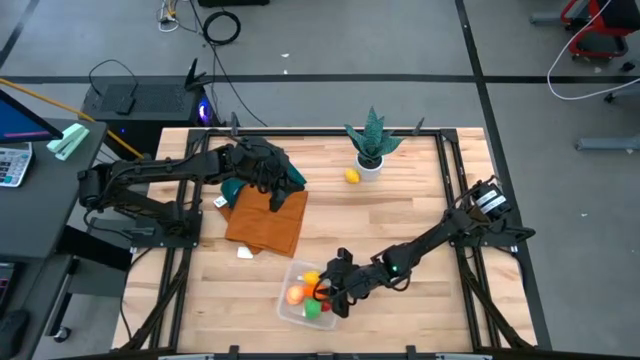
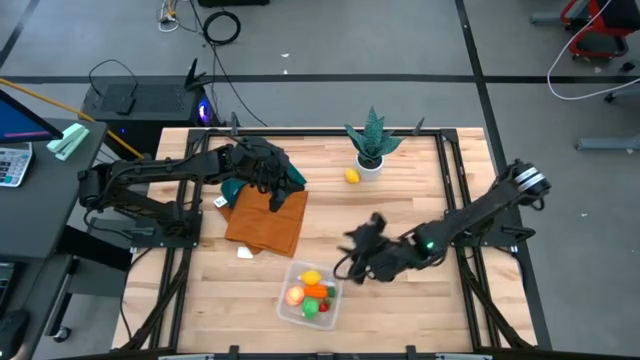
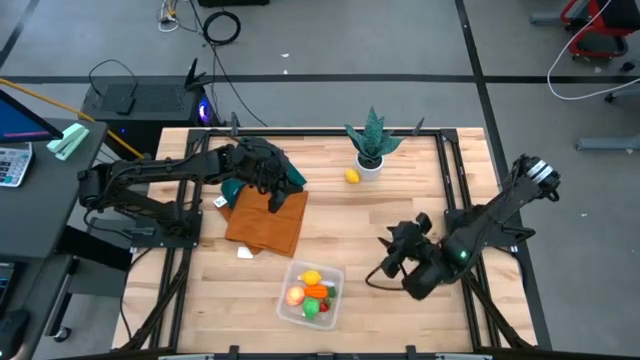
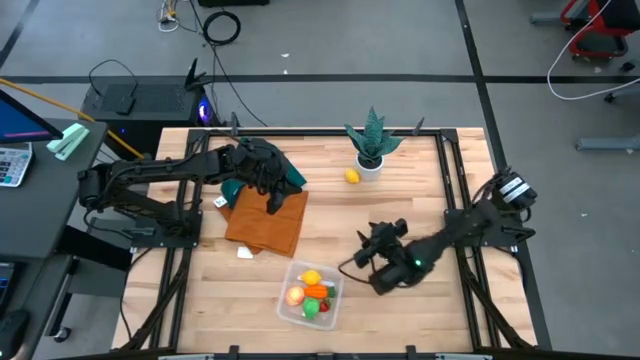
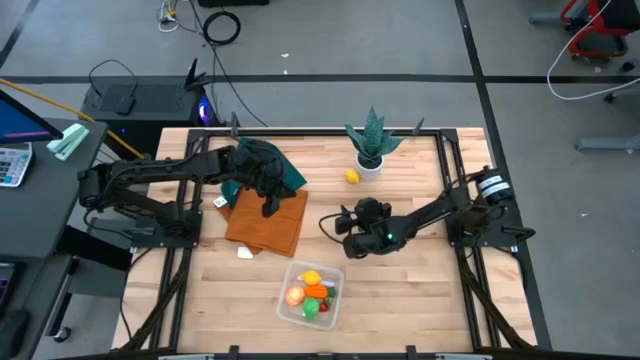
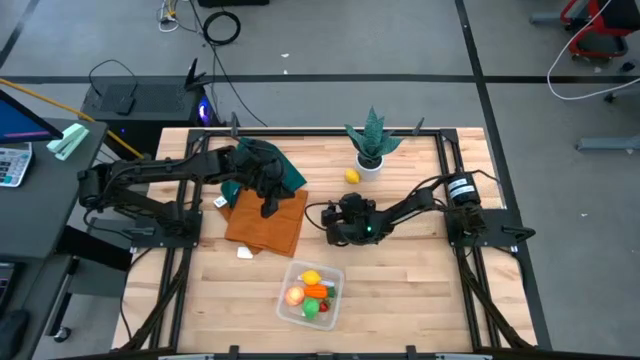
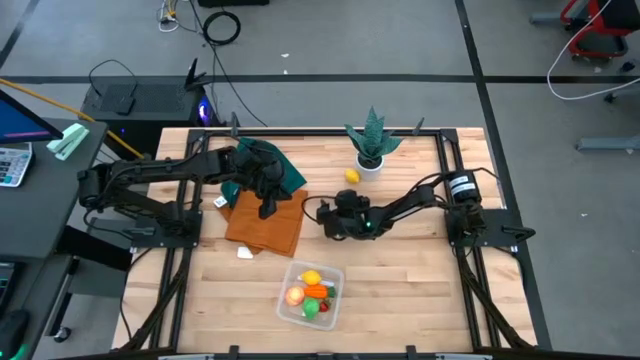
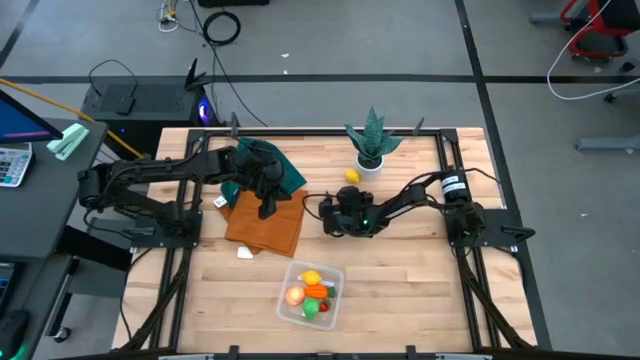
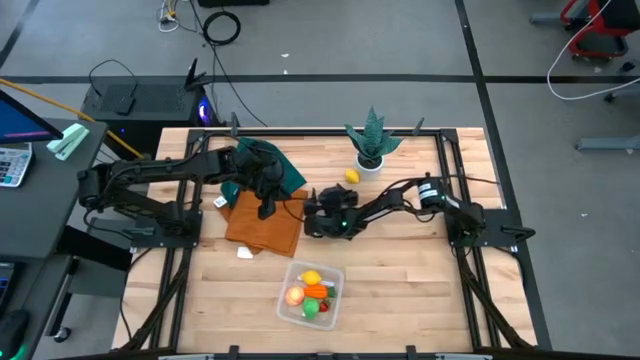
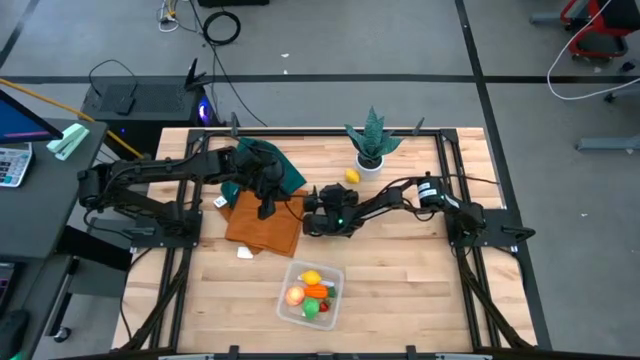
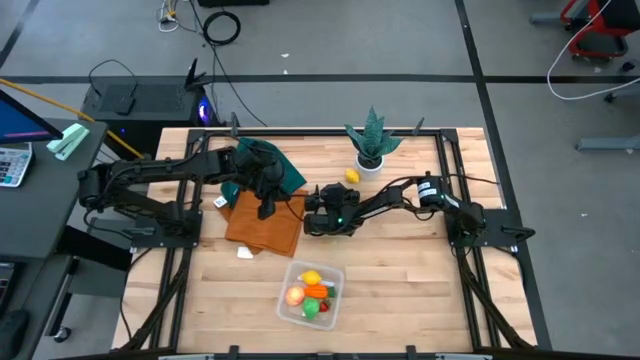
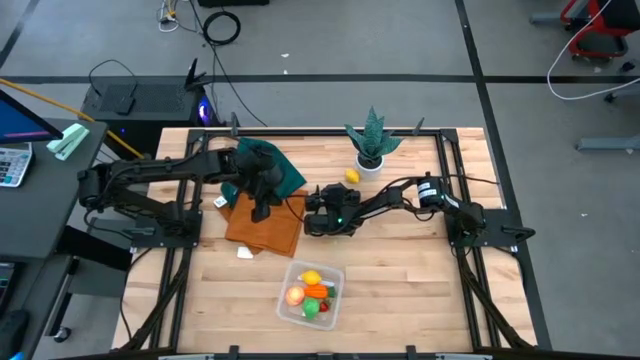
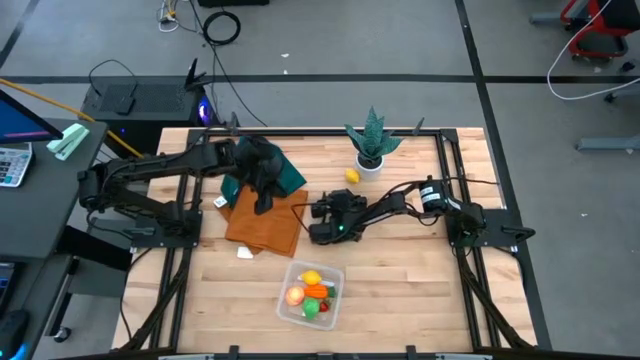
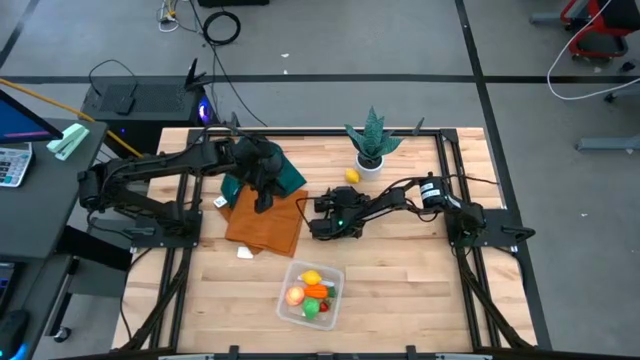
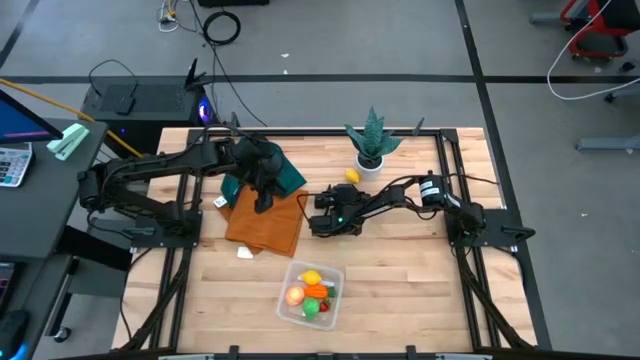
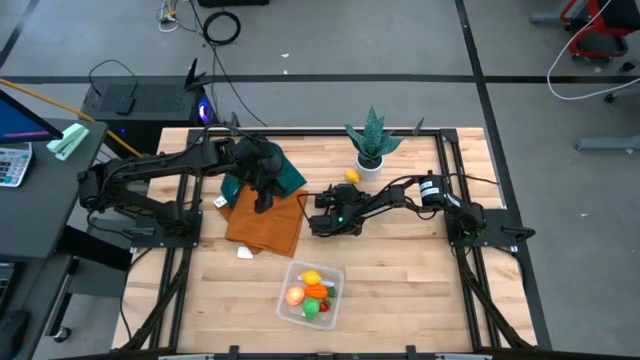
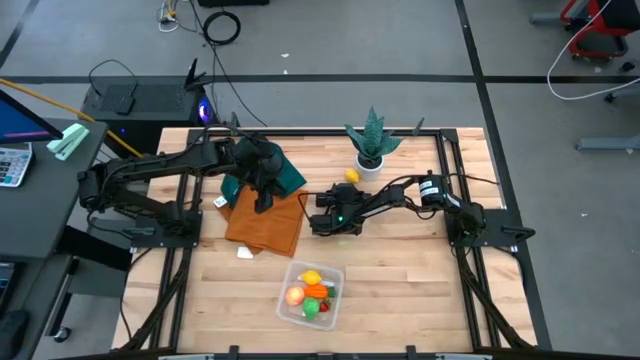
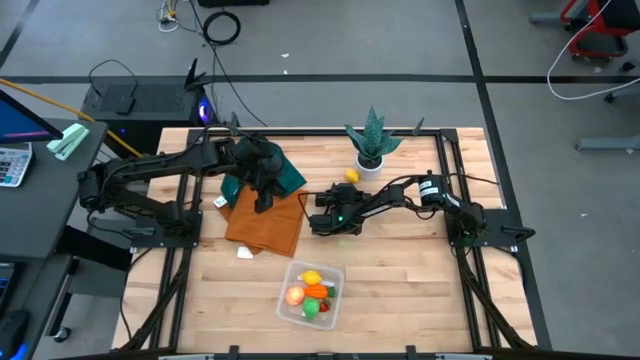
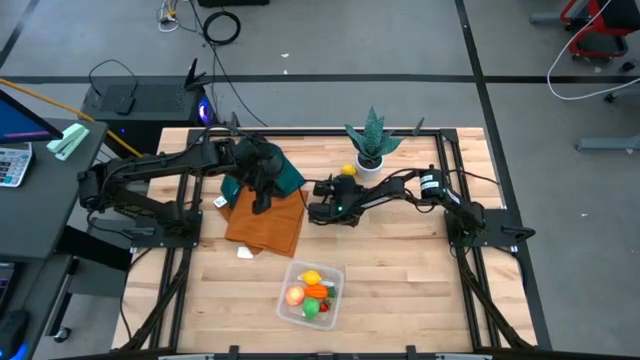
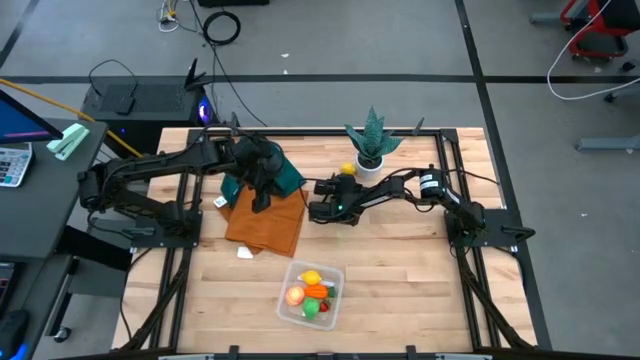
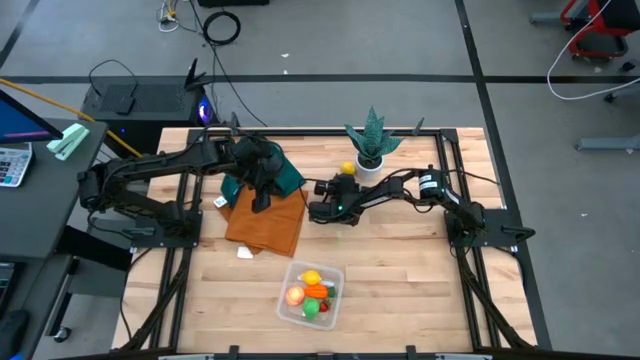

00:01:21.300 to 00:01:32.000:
Task: Pick and placing Produce into tupperware
Put the yellow lemon into transparent bin

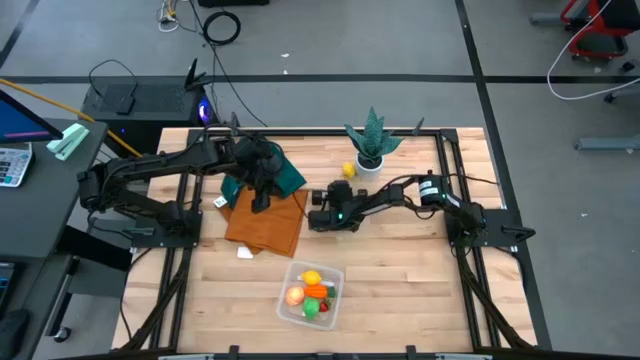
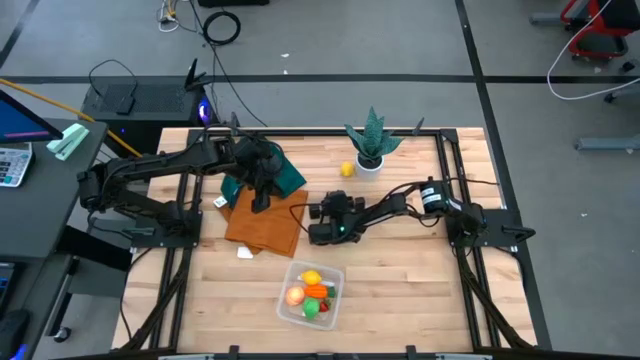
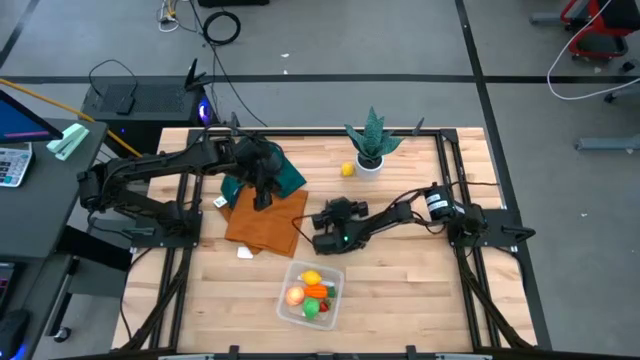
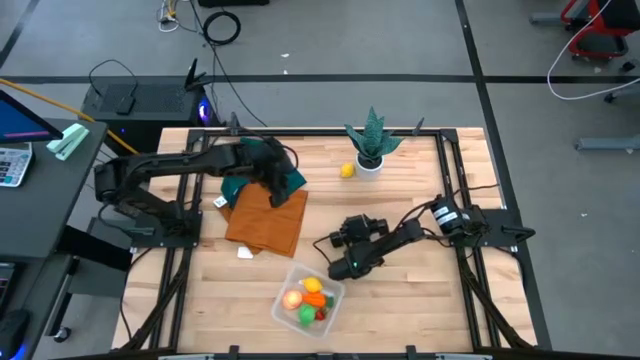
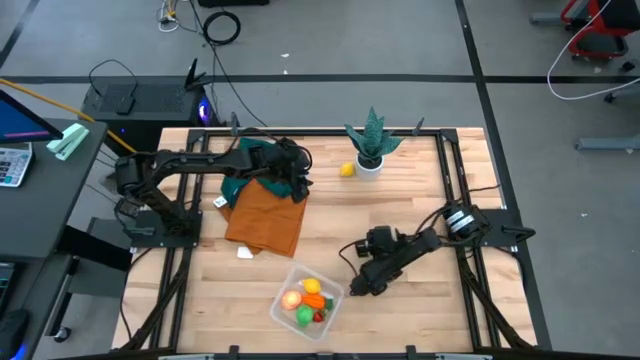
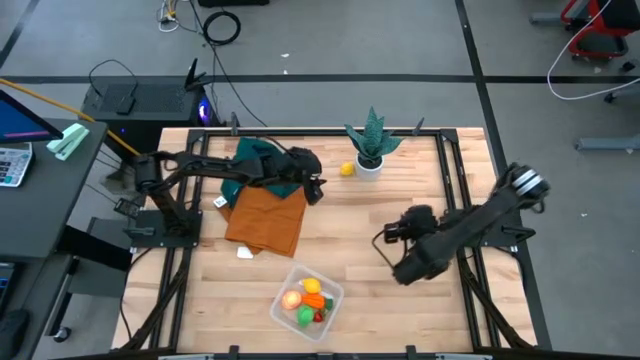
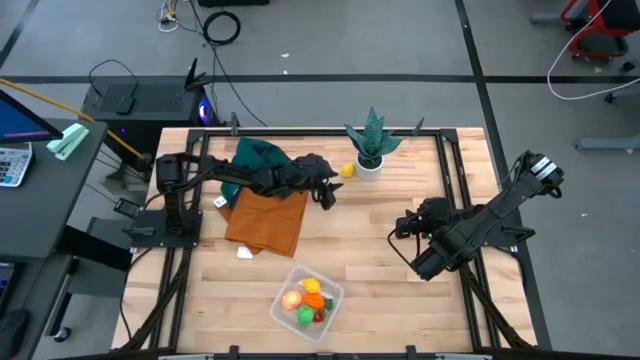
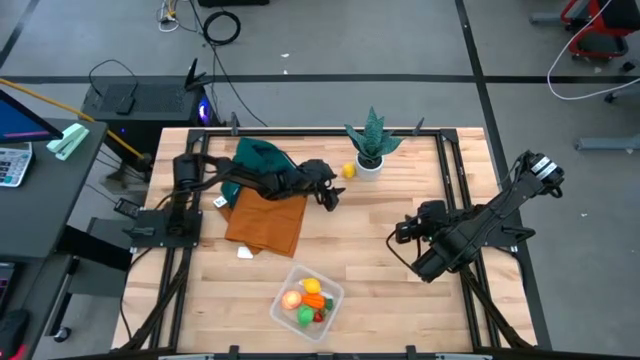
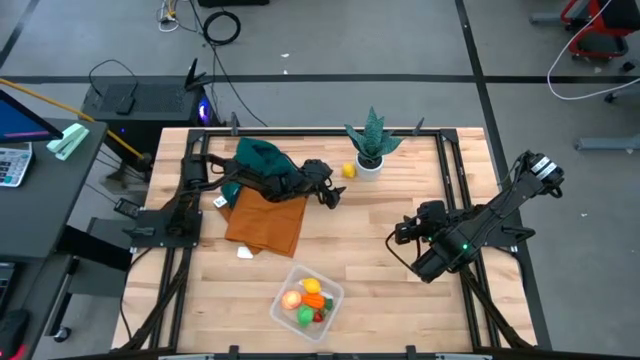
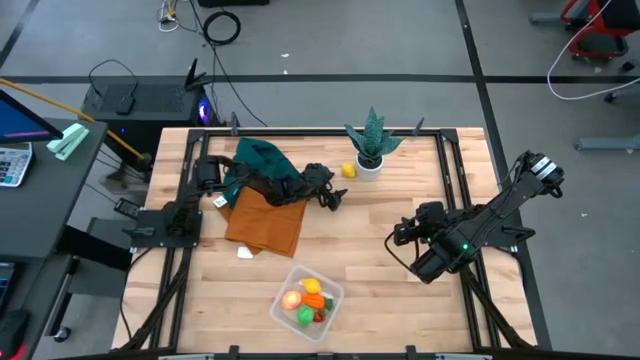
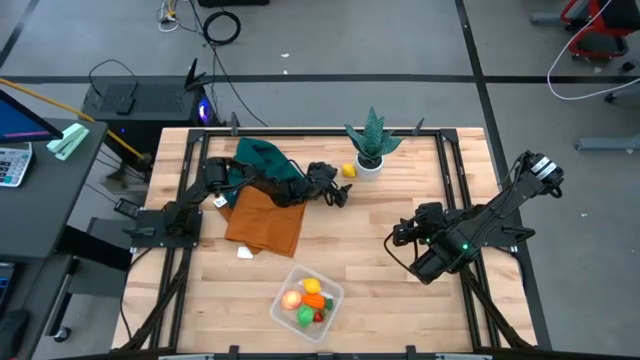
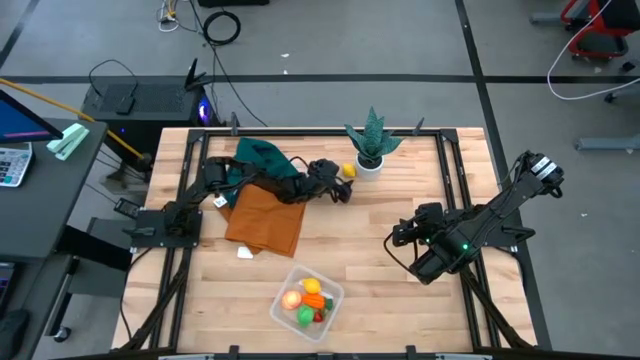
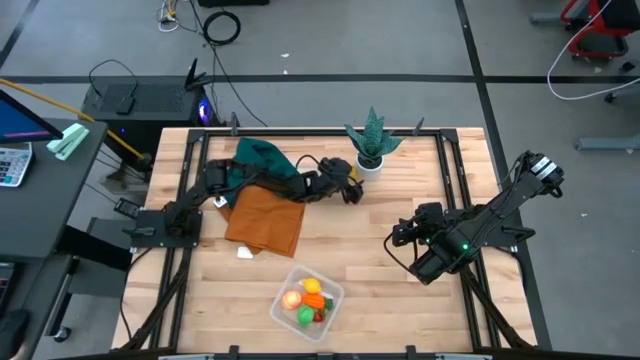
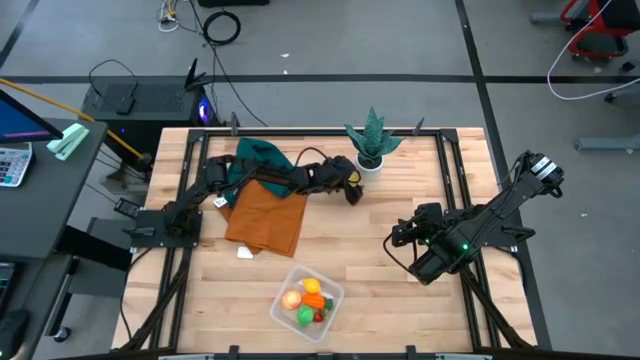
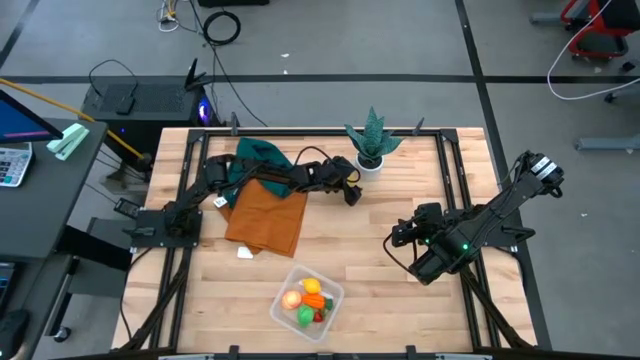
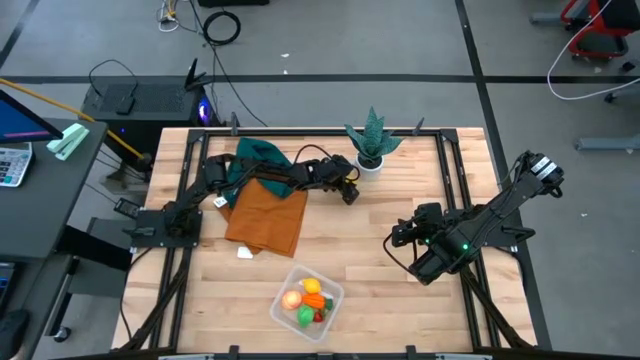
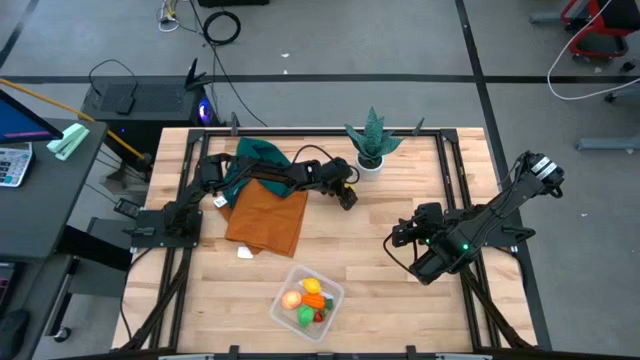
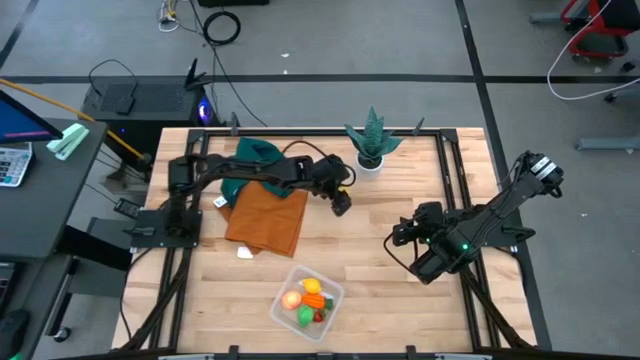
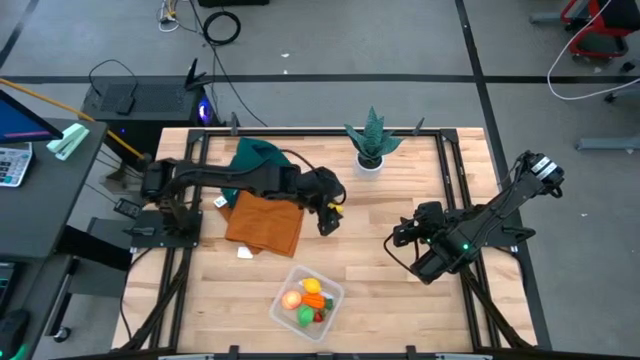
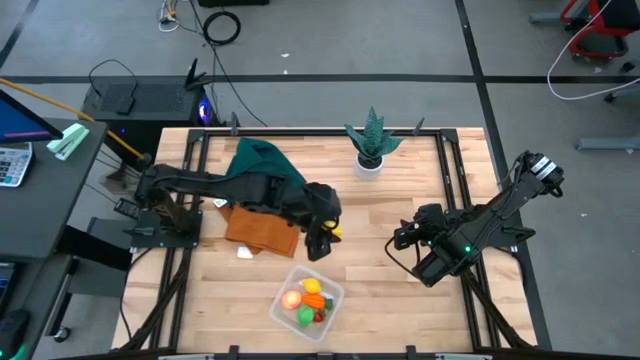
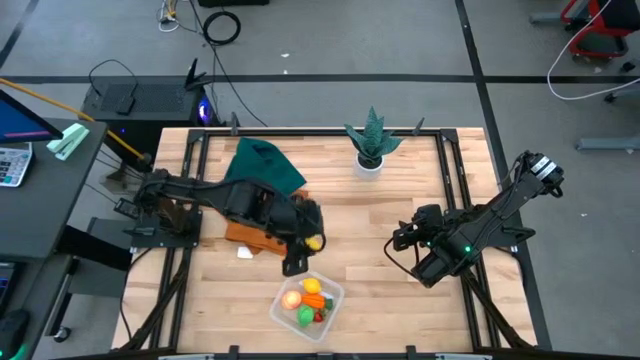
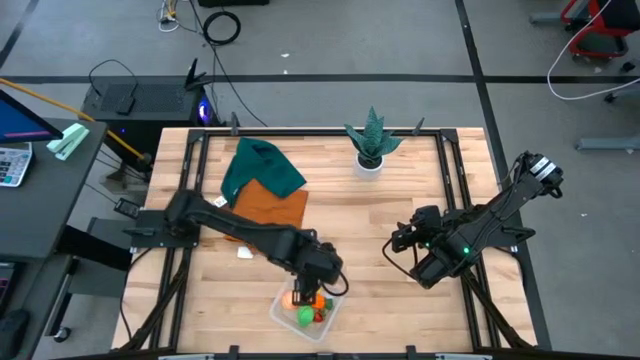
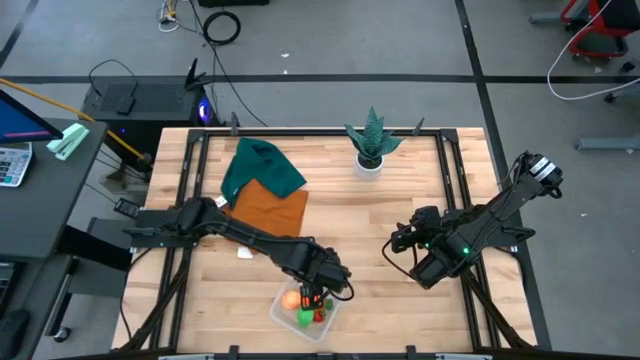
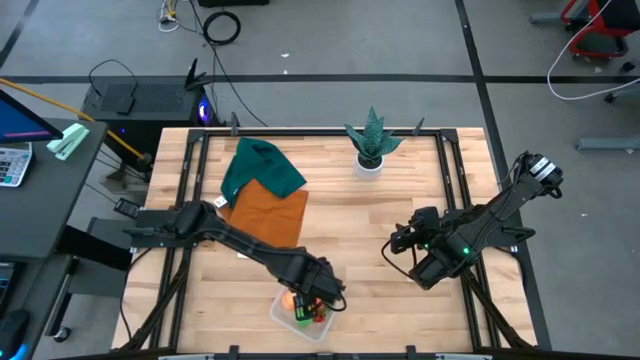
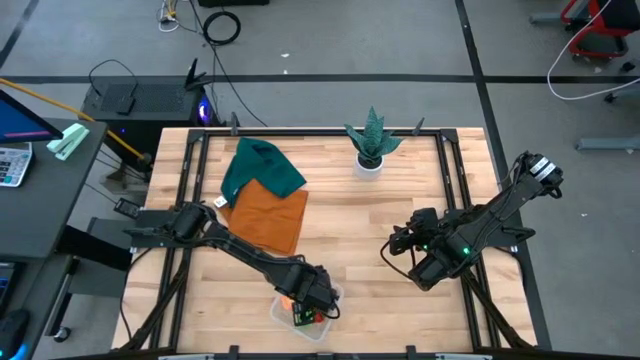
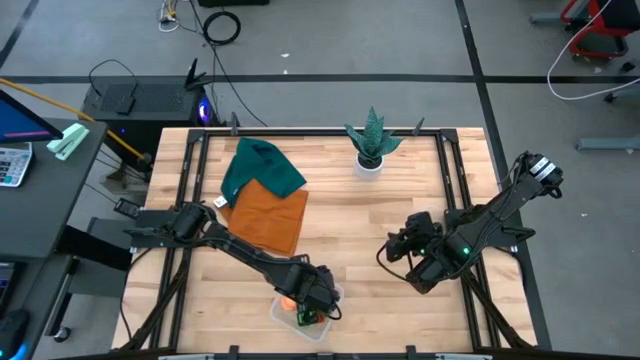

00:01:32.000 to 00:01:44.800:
Put the yellow lemon into transparent bin
